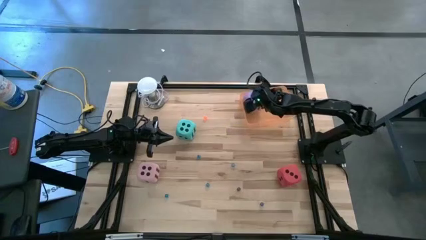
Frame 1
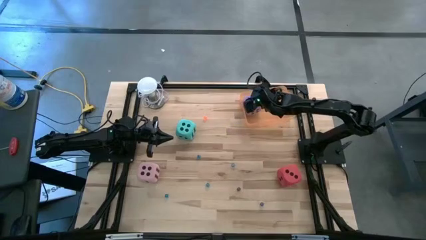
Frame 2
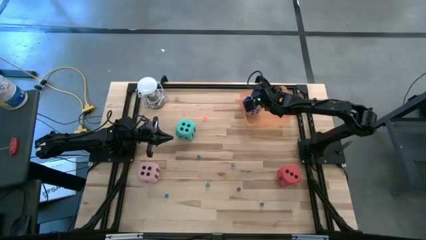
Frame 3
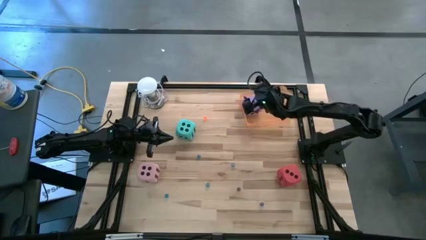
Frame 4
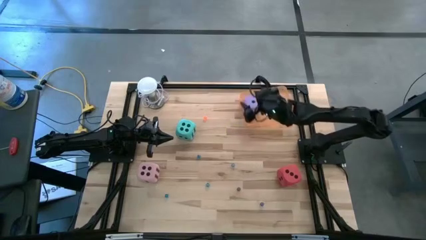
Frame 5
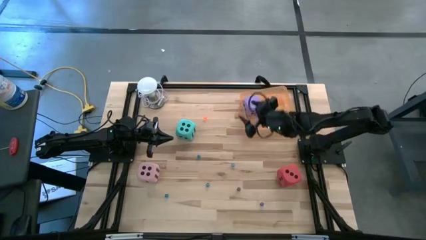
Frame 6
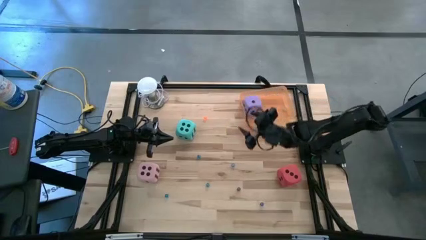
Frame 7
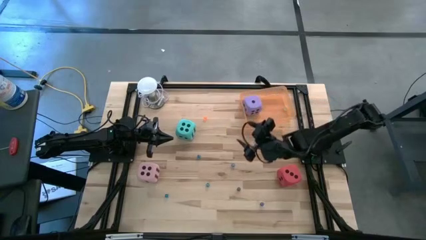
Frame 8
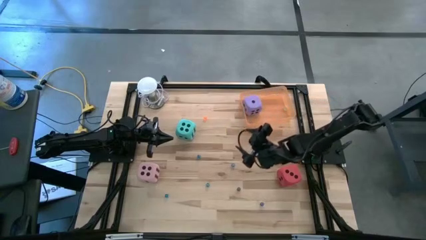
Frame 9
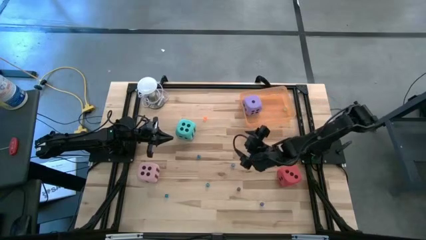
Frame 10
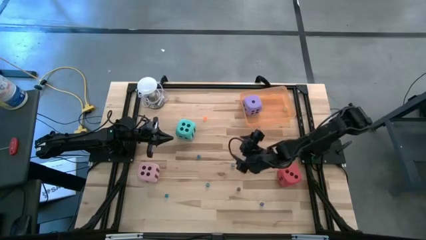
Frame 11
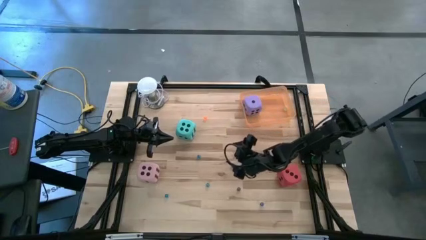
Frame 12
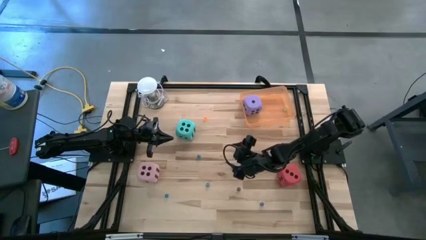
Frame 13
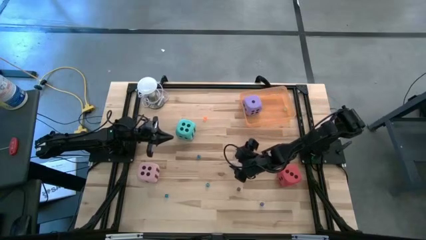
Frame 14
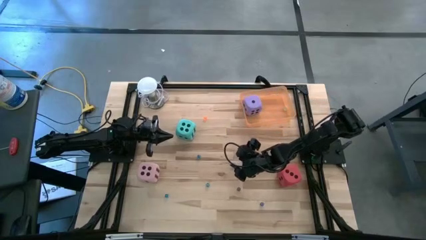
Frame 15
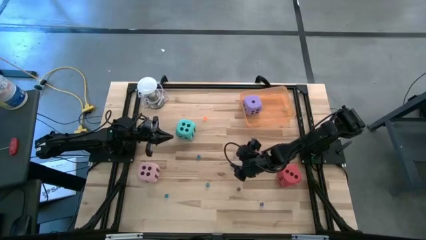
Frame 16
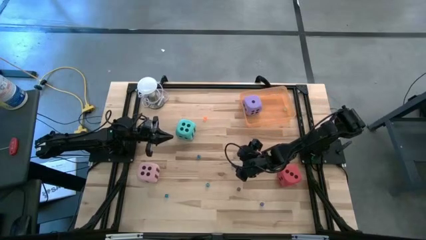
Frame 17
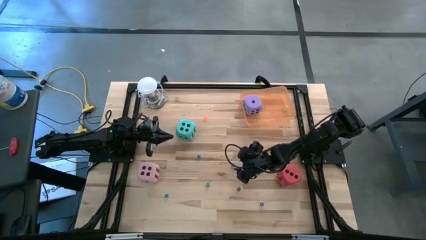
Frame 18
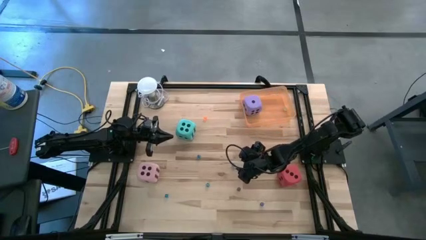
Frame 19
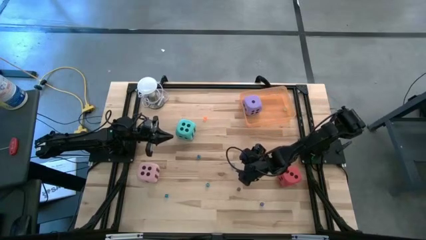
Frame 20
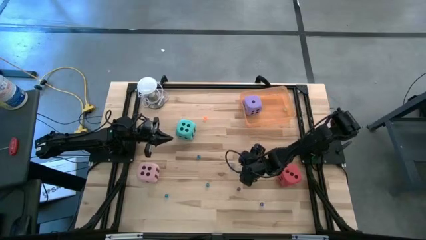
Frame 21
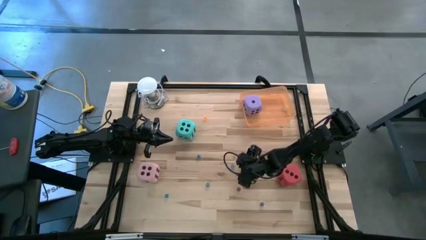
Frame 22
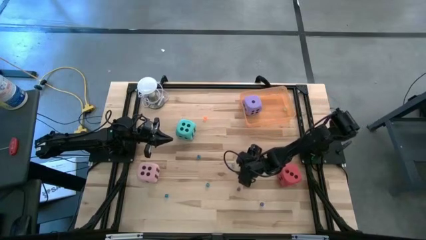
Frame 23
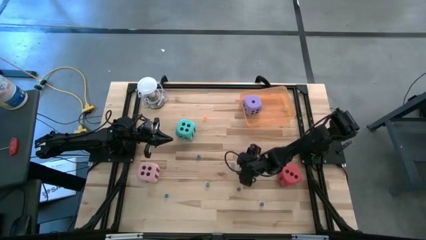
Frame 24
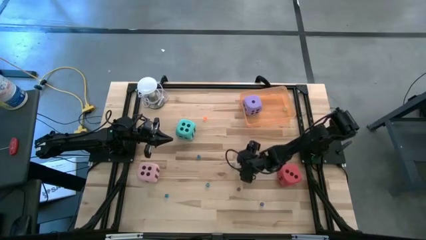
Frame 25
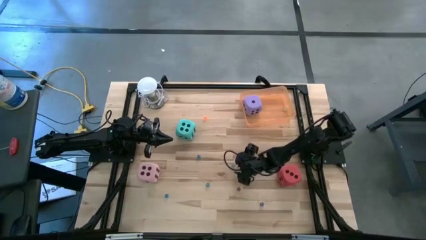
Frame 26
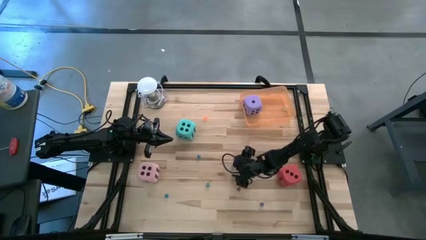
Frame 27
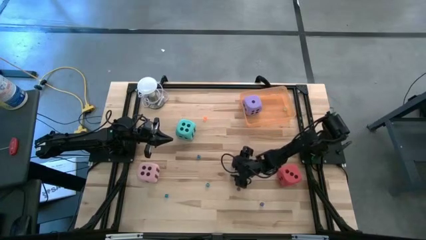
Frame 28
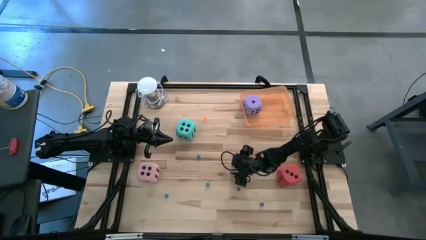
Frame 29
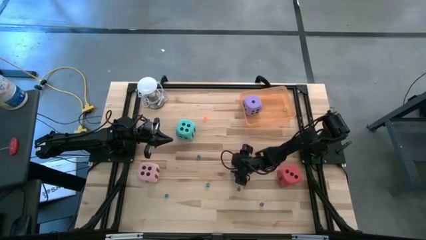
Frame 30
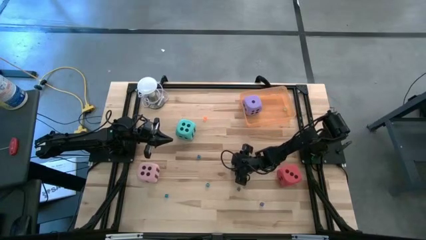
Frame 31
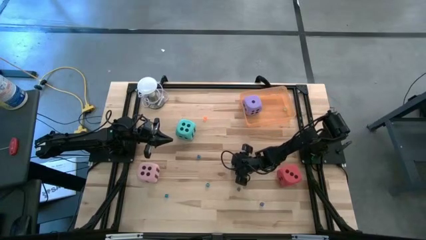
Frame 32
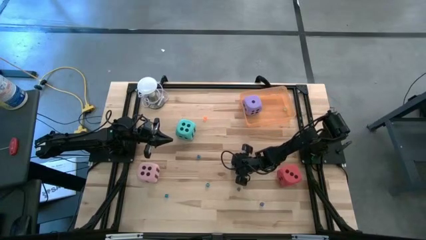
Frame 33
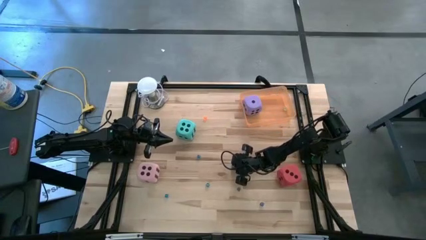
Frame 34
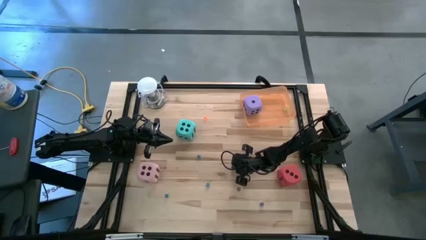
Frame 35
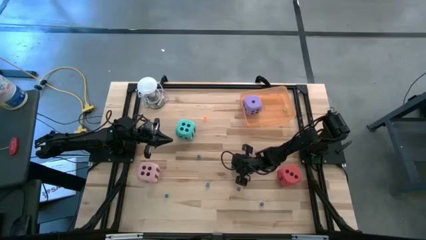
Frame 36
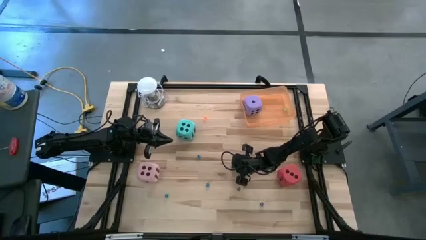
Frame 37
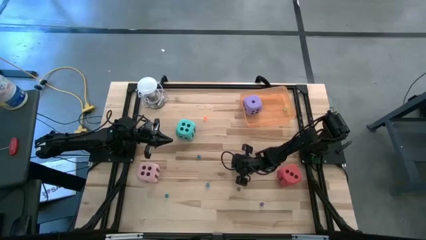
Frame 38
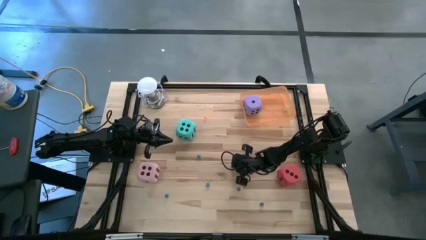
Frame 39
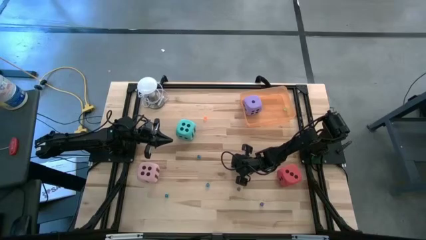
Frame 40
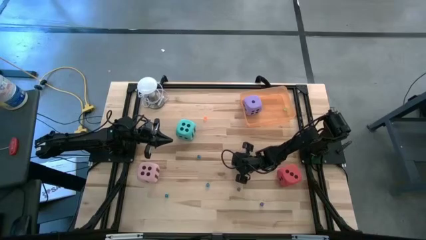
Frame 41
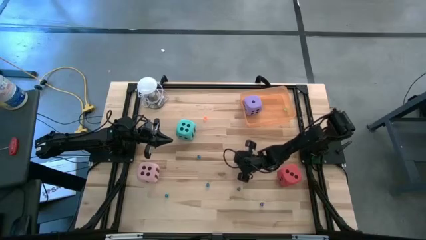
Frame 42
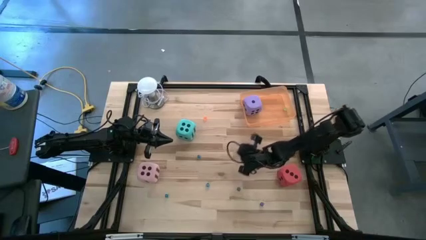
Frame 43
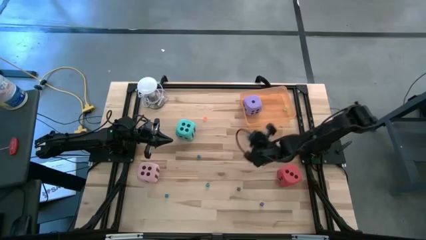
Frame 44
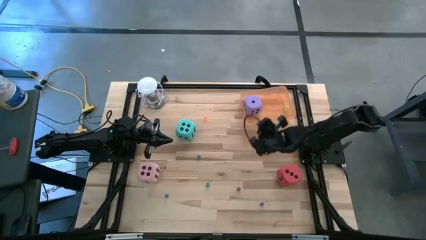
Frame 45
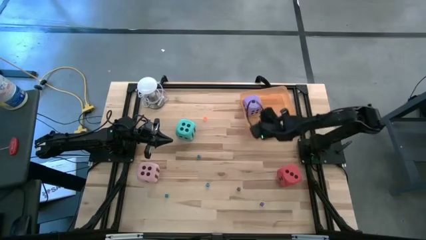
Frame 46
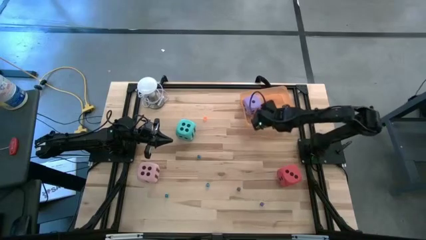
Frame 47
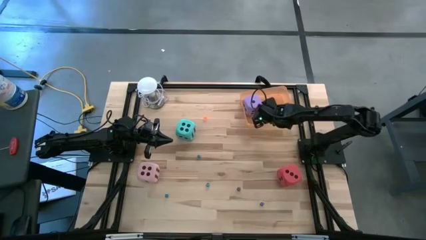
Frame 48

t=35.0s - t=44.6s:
Task: Pick & Place Dice
Put the small light blue die into the the orange bin

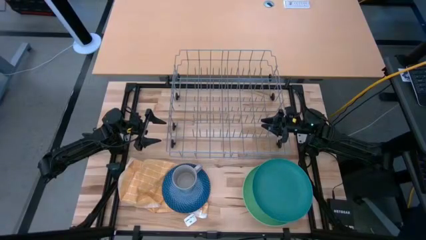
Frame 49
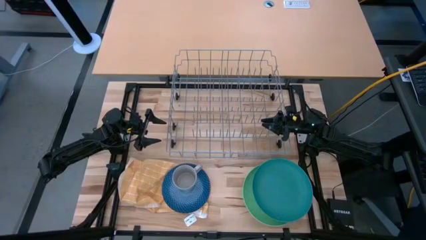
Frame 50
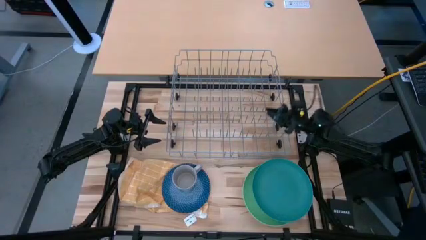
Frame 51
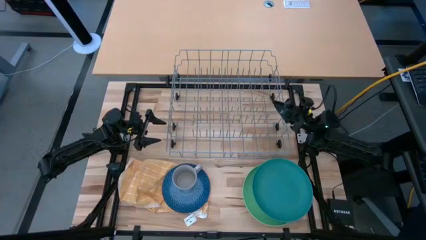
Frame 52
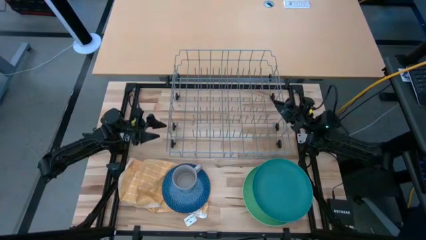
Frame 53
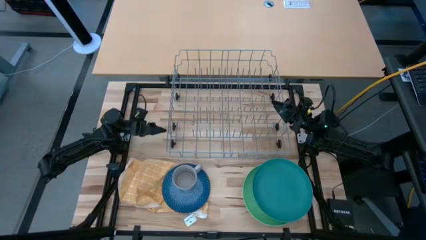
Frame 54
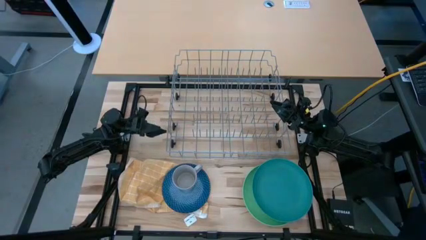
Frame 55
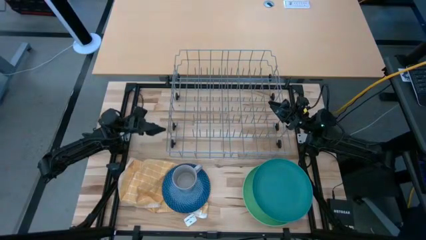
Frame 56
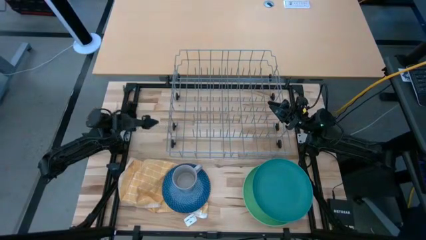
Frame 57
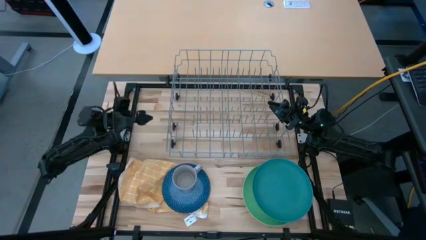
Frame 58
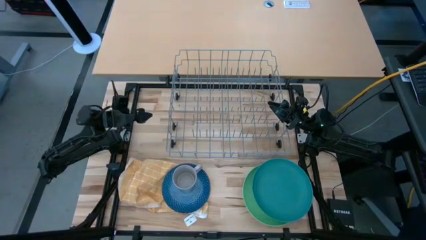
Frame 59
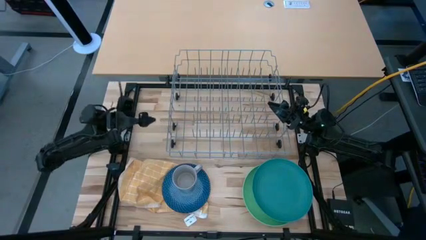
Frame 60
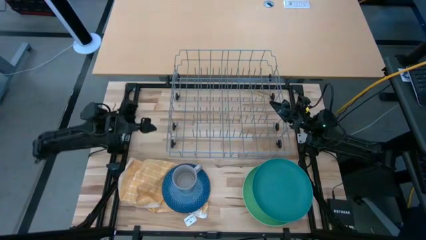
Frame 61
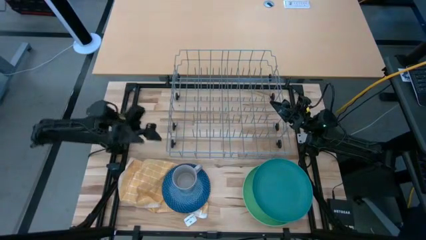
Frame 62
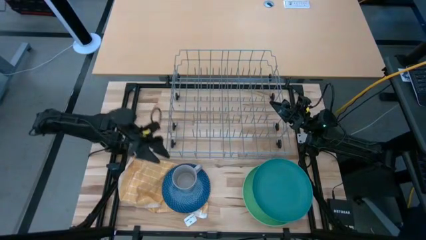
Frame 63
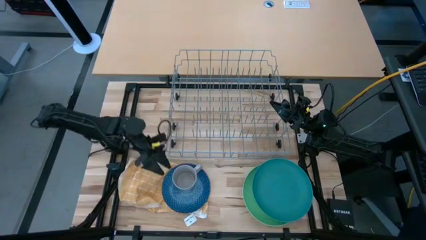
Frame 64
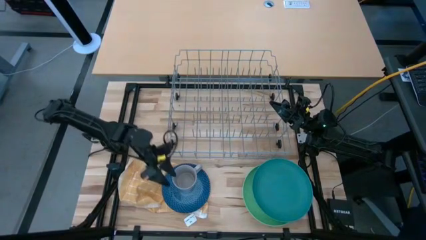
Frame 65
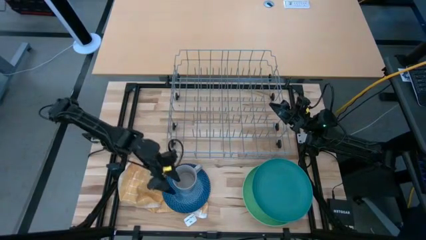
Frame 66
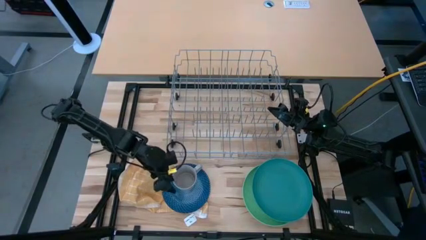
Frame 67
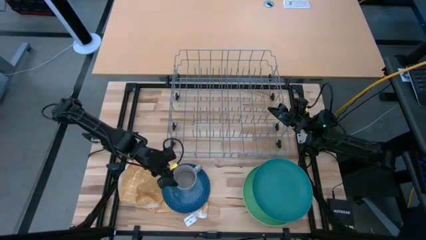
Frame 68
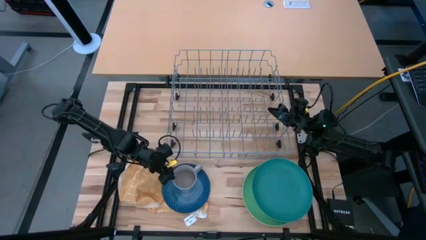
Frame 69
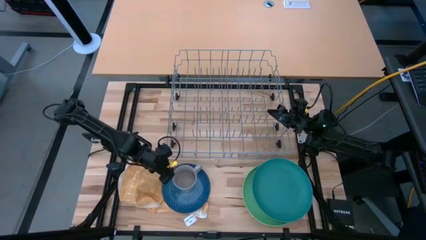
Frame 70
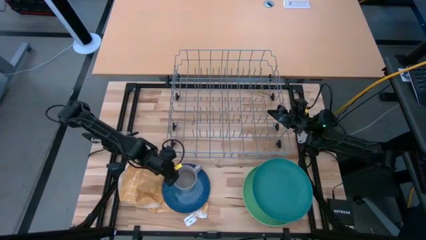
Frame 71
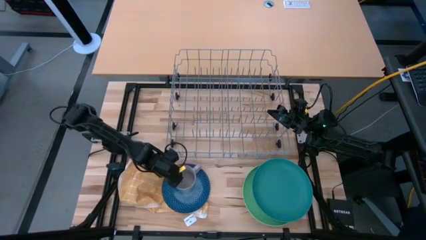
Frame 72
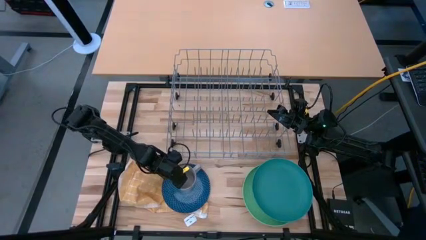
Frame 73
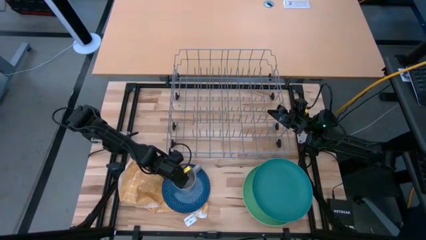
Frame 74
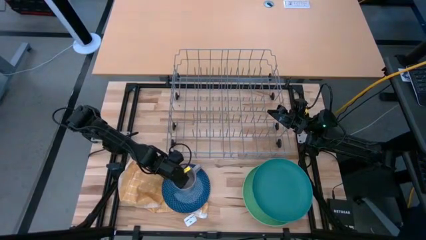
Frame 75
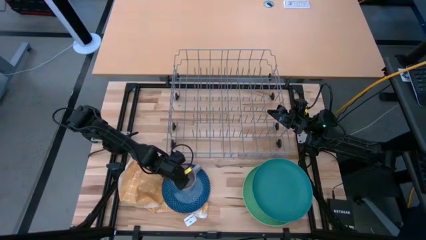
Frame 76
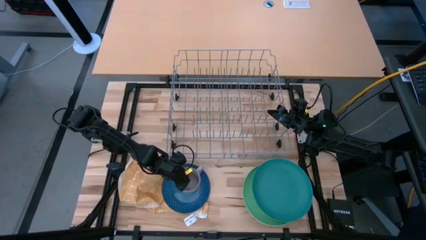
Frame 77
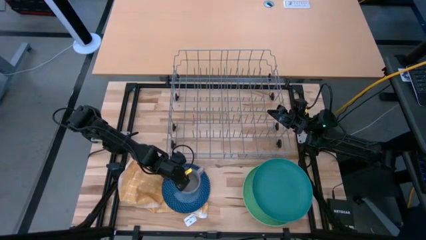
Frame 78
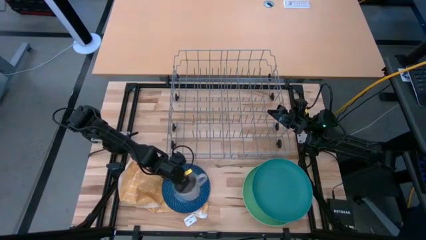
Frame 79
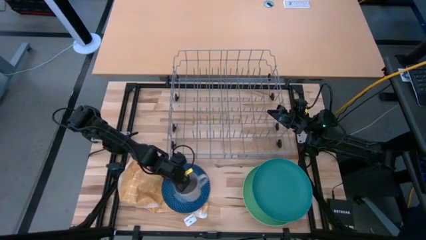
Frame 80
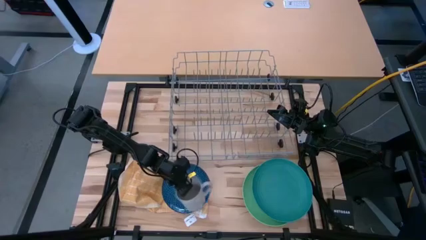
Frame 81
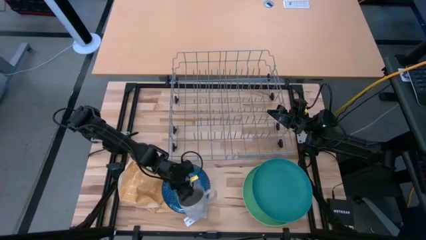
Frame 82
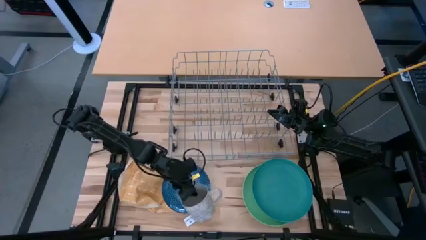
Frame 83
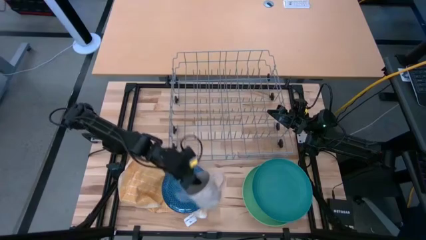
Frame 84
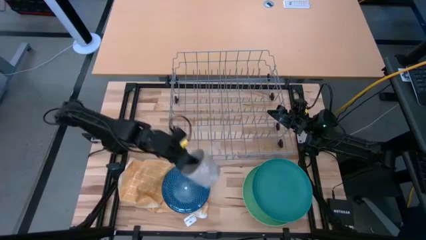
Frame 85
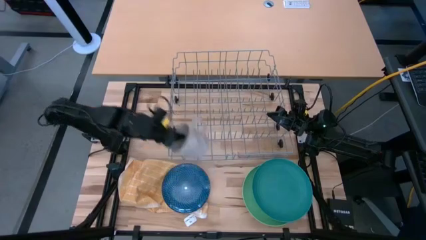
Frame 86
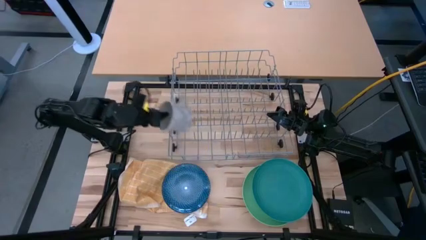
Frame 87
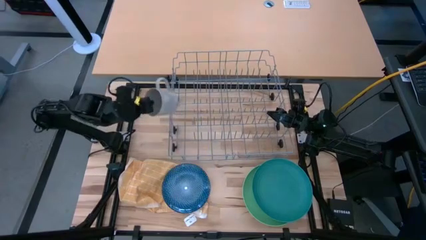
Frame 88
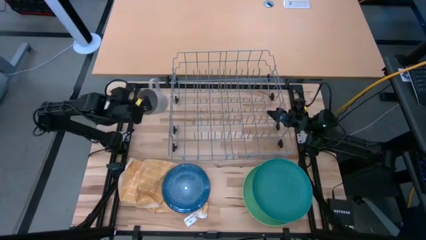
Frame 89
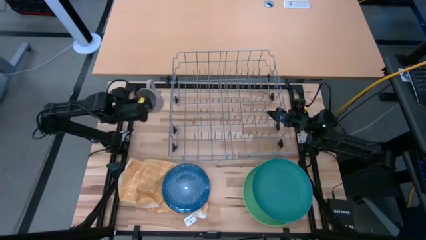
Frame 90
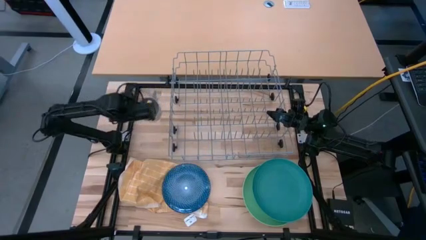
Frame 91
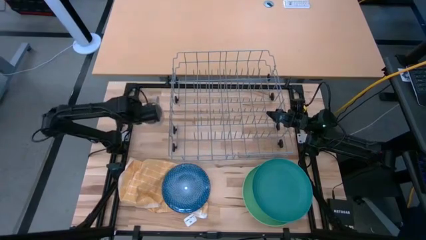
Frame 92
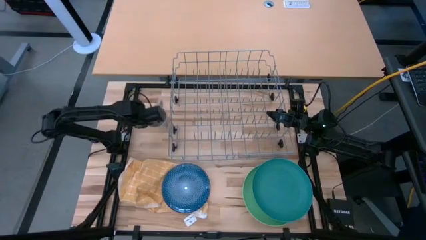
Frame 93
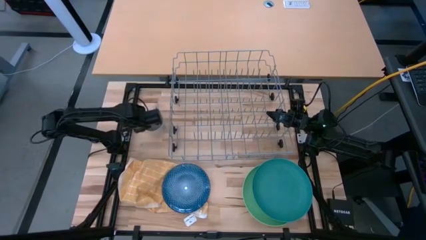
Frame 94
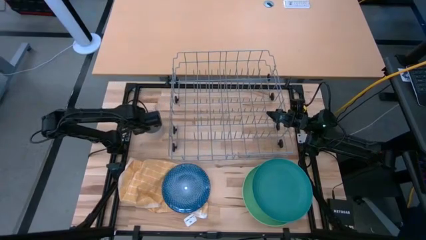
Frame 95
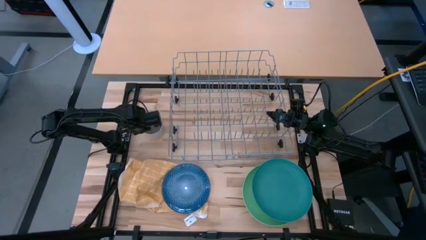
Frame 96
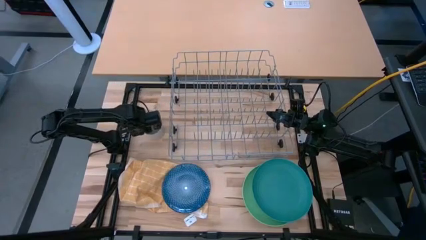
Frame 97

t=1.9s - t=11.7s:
Task: Sort dishes
Move the mug to the middle left of the table
